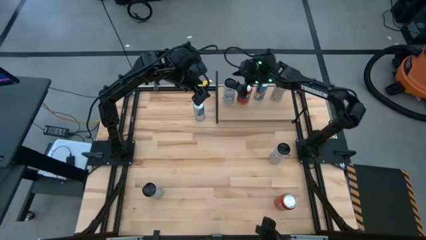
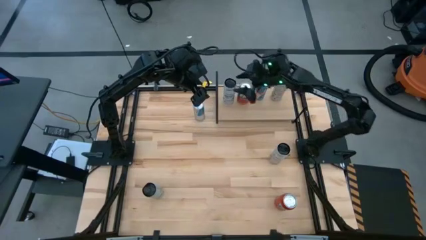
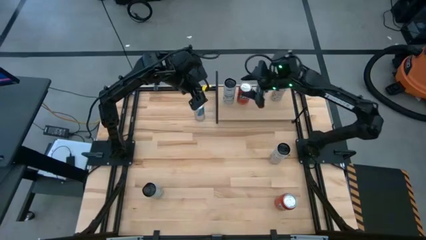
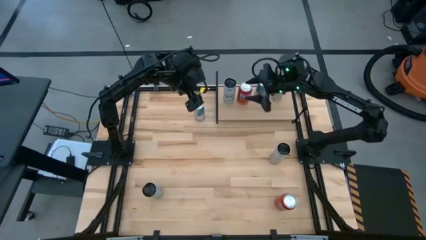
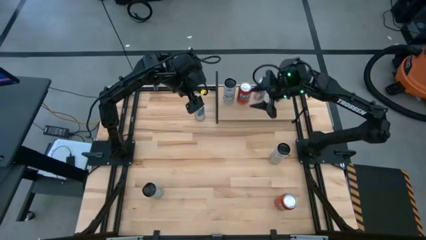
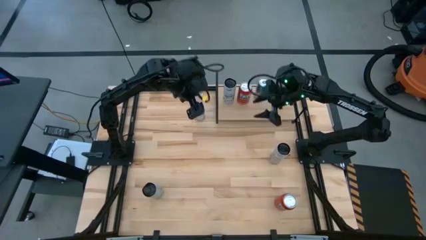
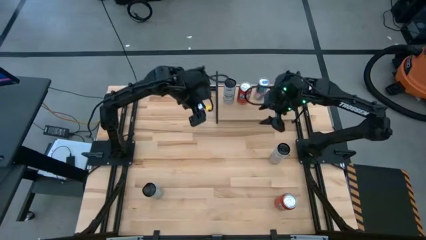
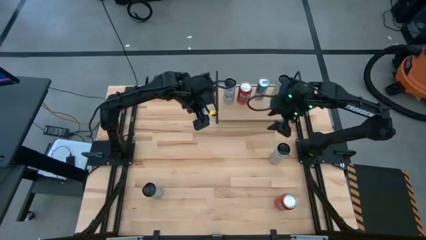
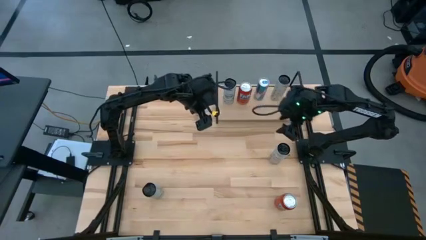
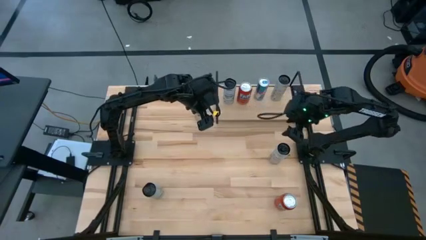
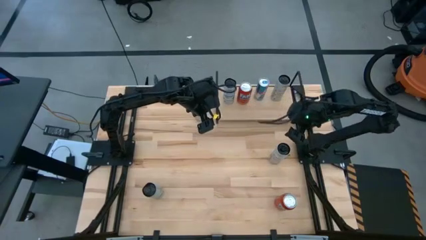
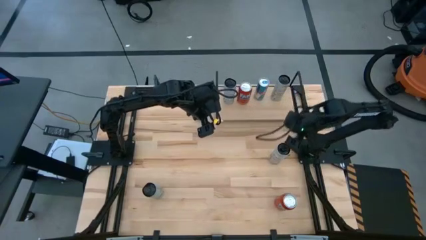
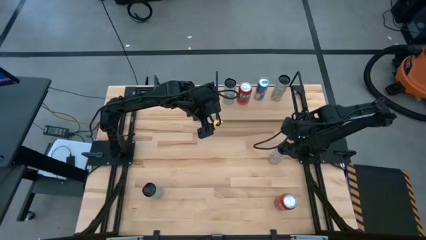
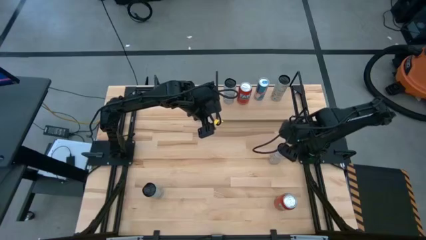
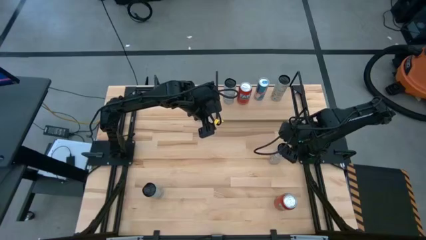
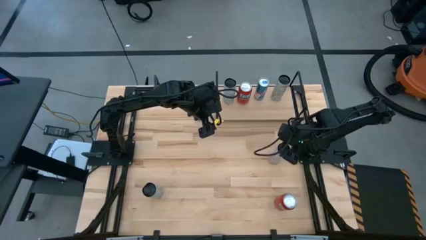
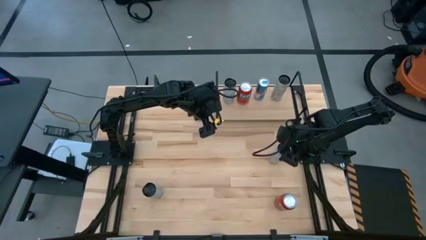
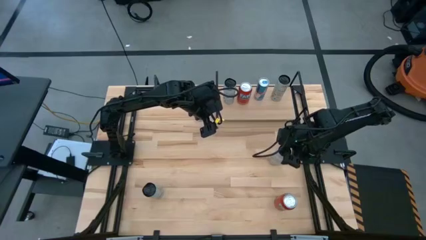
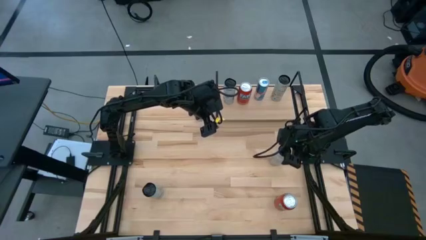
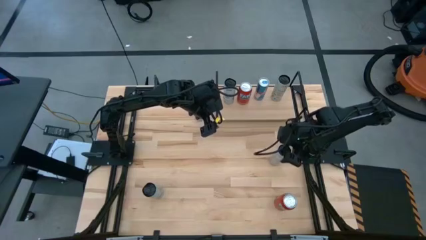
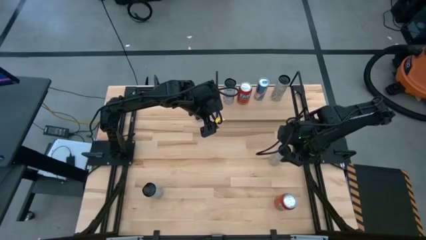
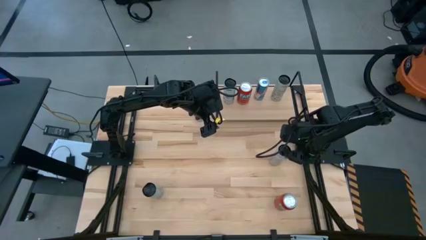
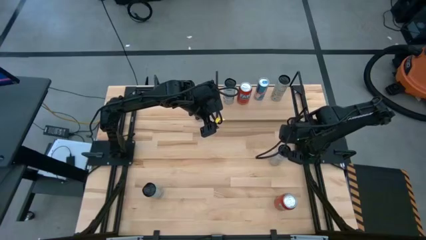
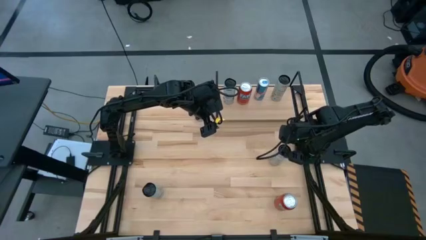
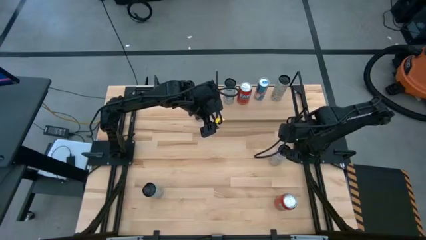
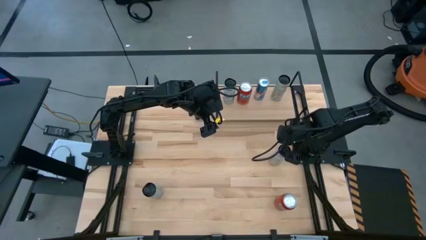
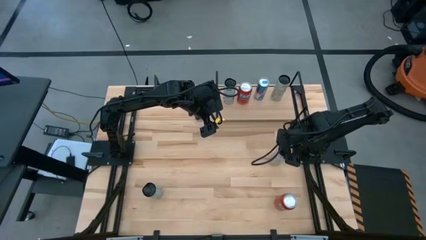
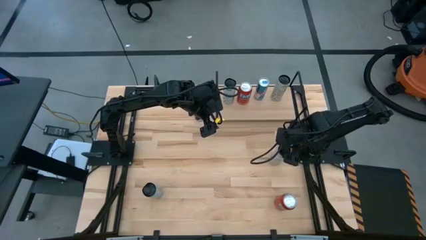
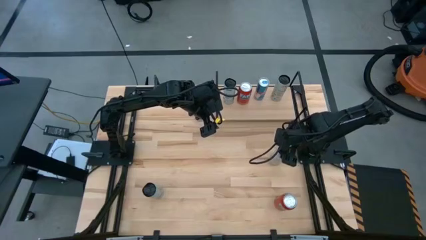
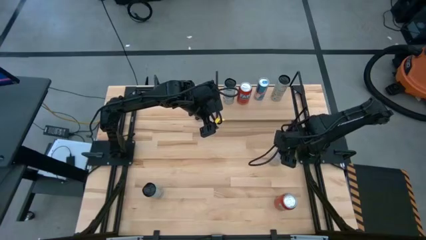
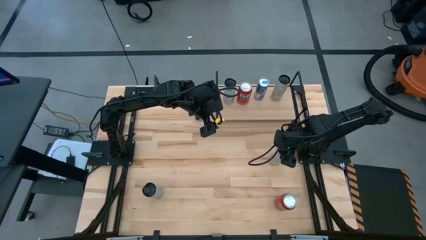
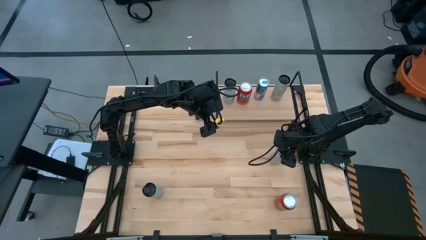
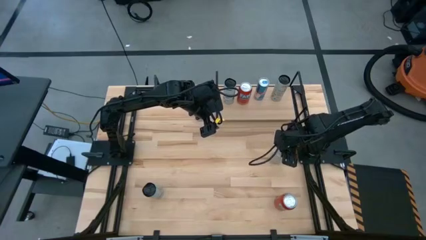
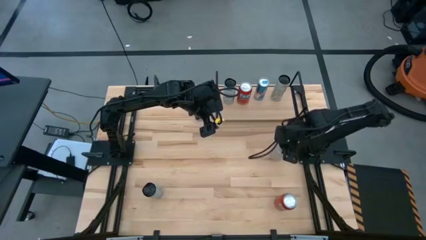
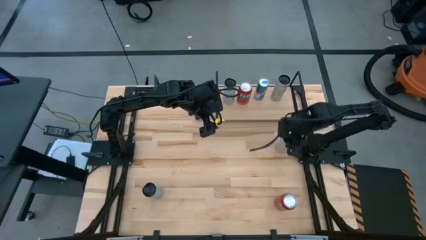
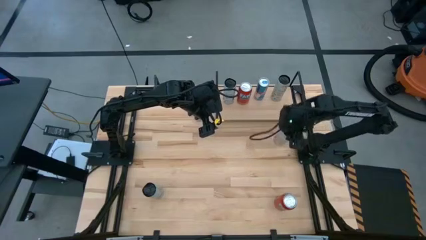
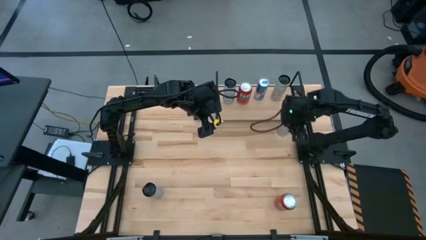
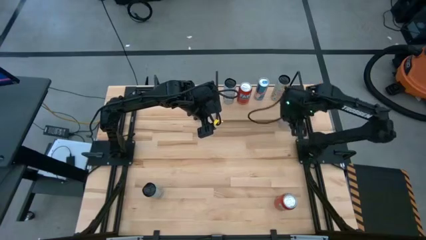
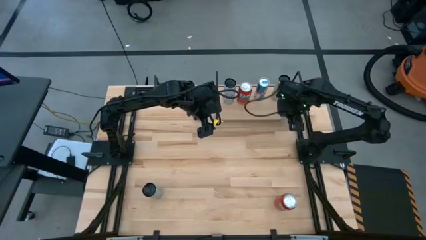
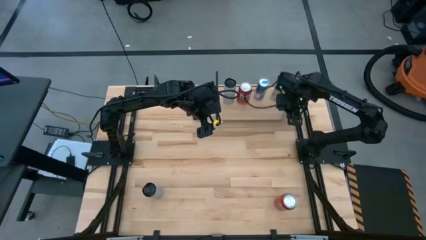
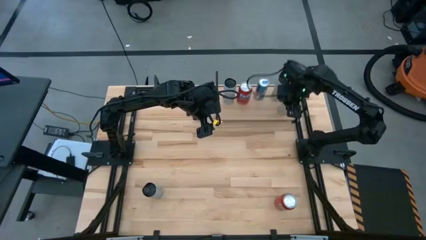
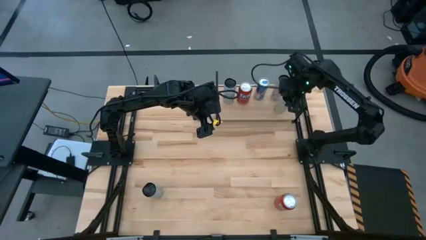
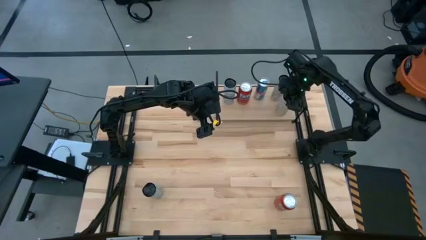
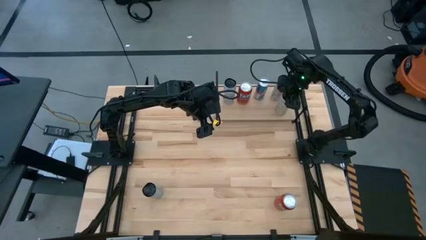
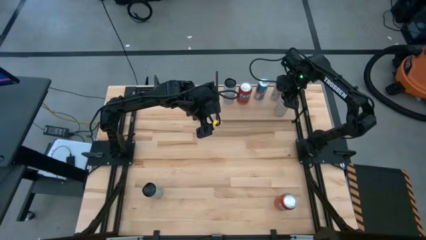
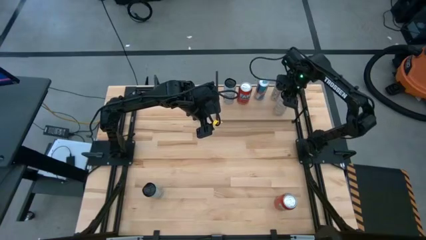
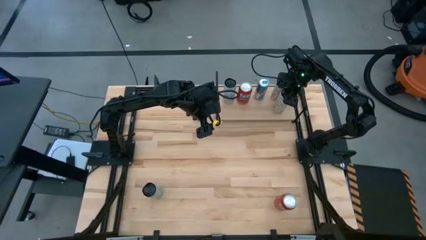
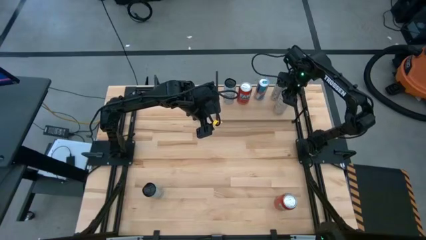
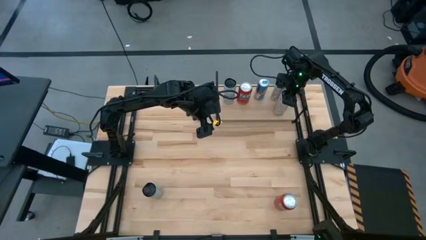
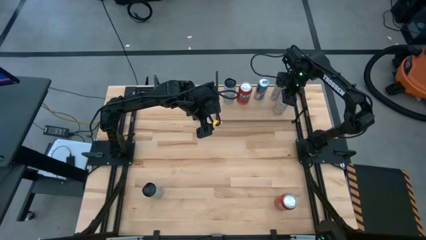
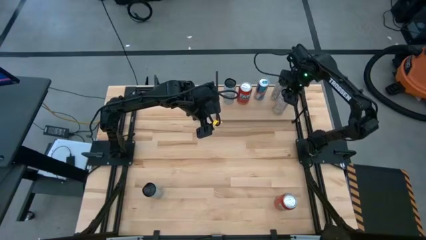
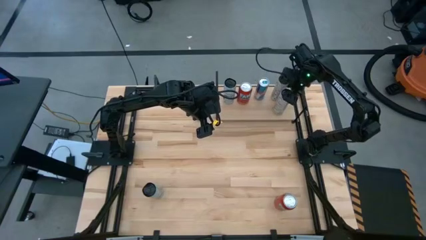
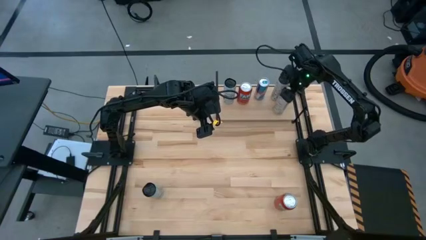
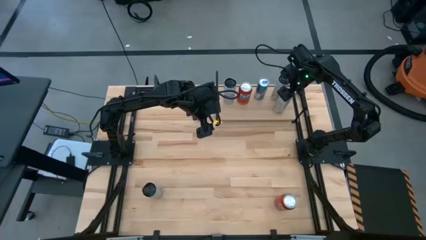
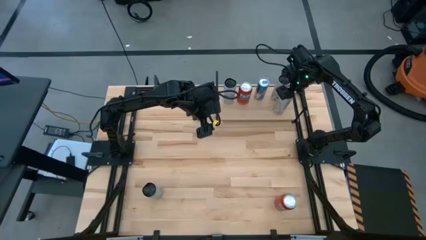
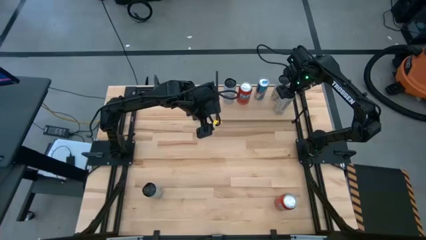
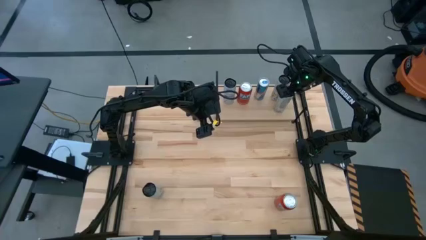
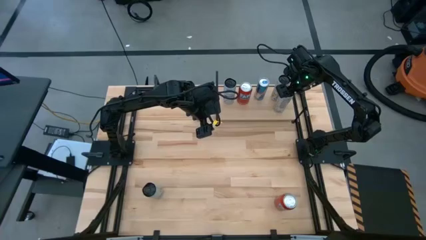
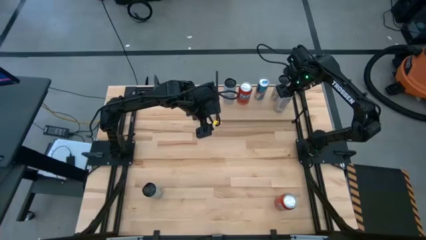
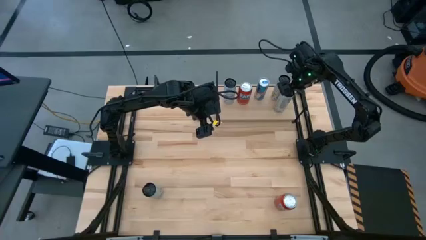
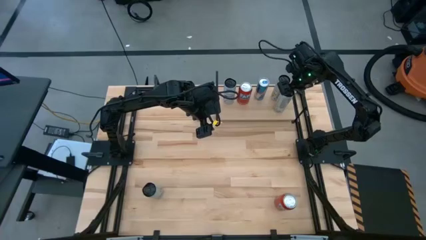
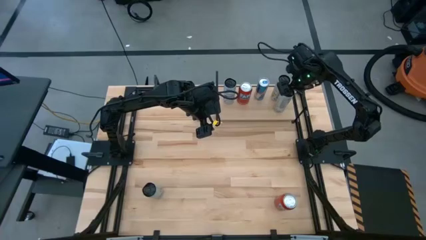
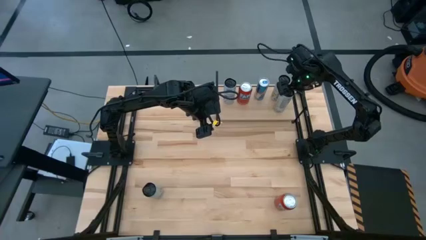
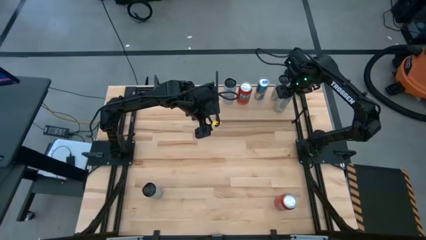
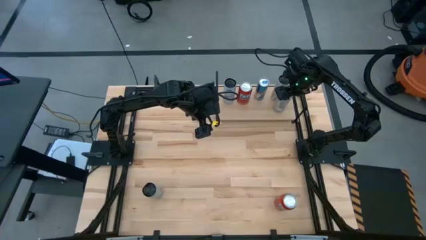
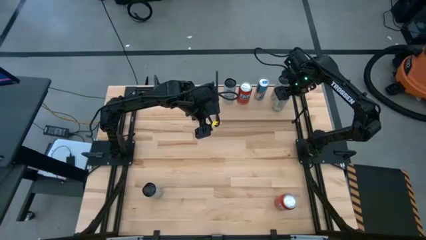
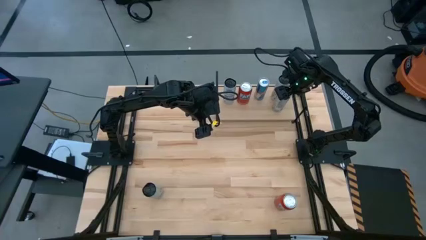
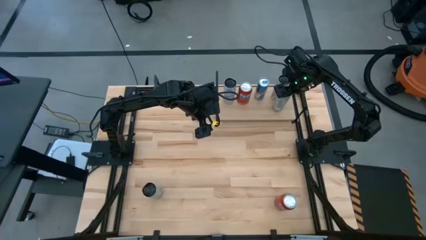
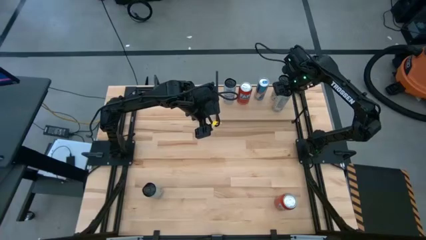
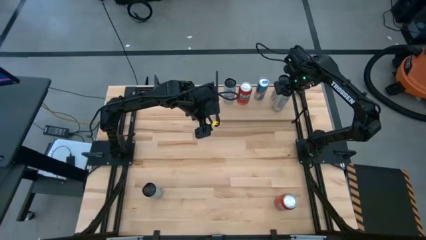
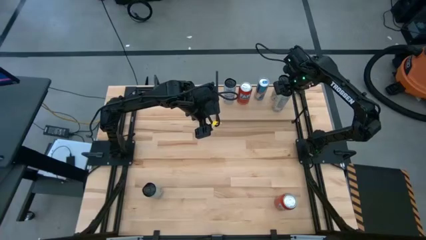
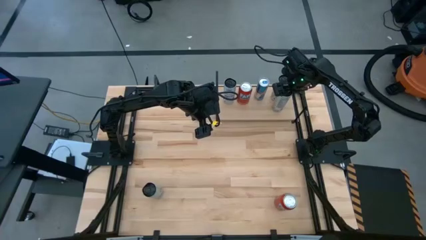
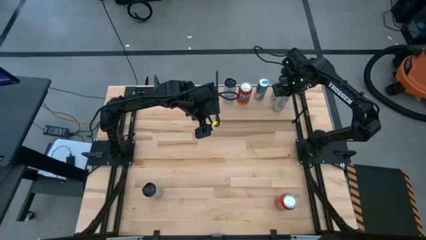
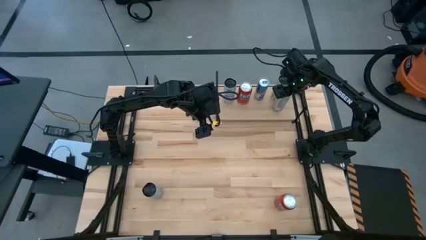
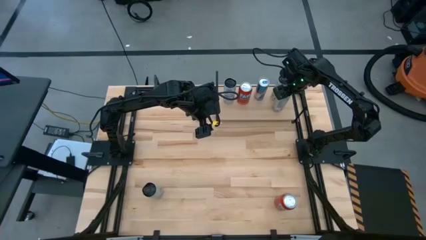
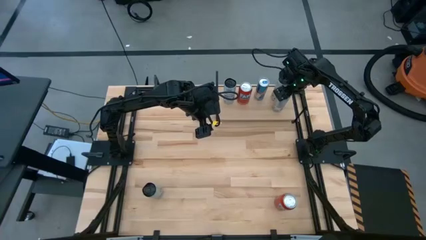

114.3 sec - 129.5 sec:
Task: Place canned beverage on shelf
Put the white yellow soda can on the shelf aligned with the other white yellow soda can

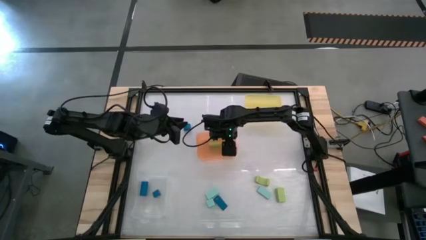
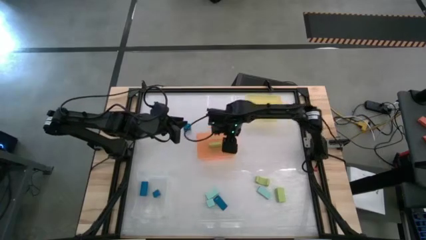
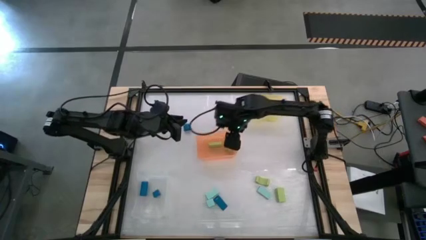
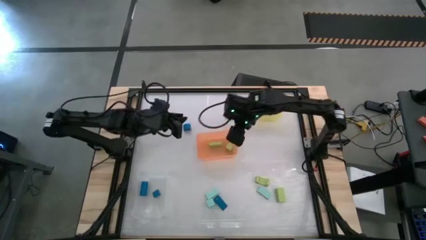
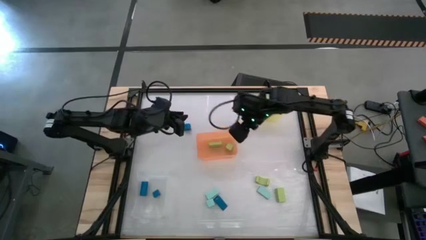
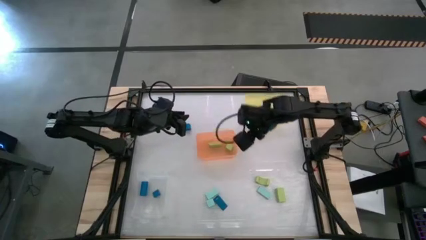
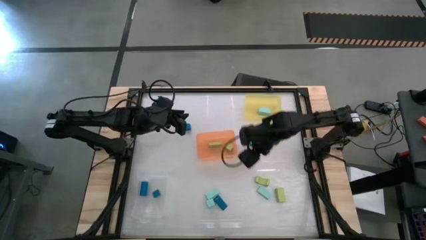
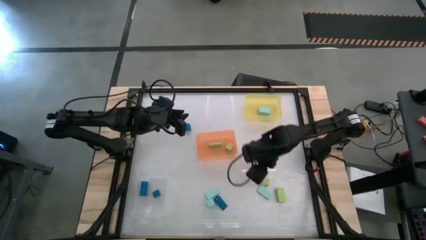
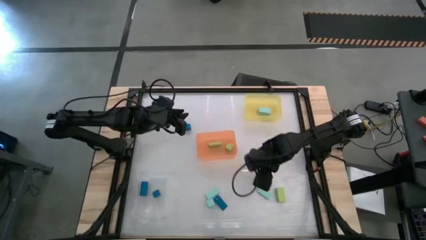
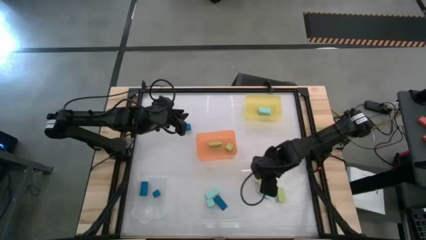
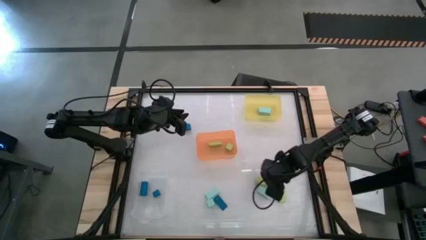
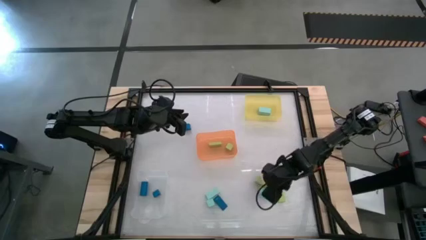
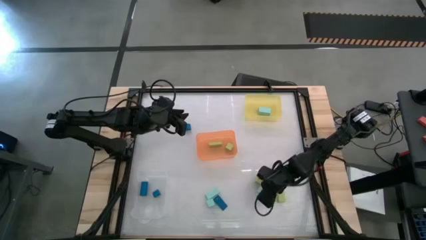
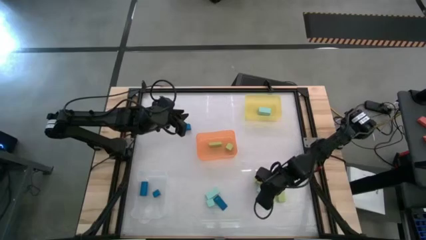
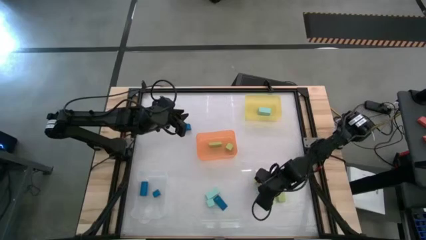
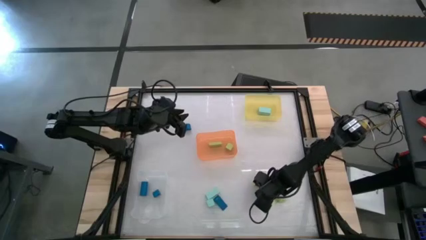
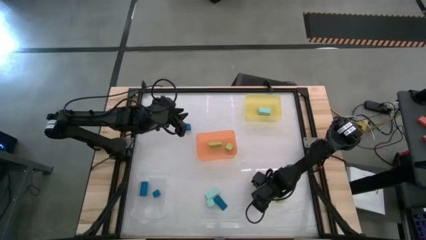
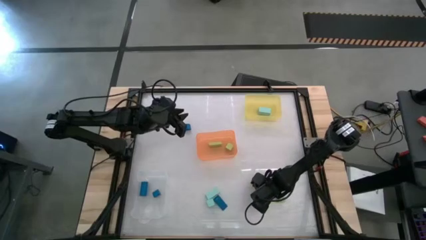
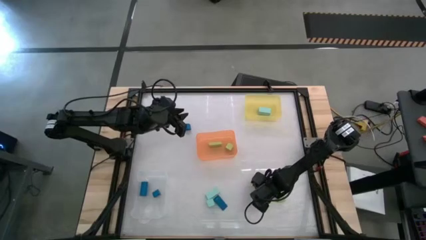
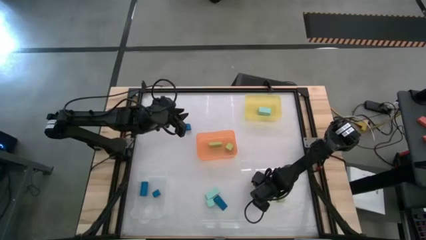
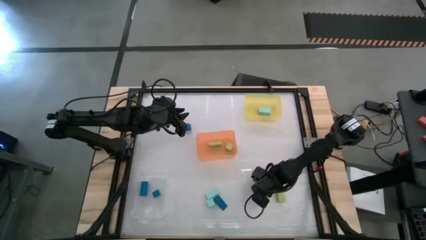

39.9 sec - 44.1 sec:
Task: Sort & place blocks by color
Put the light blue block into the yellow bin
